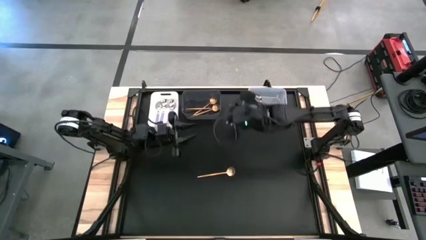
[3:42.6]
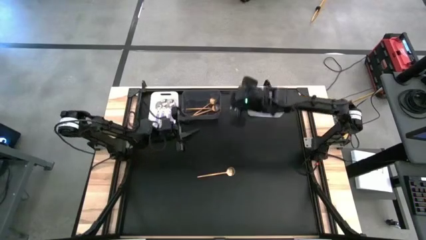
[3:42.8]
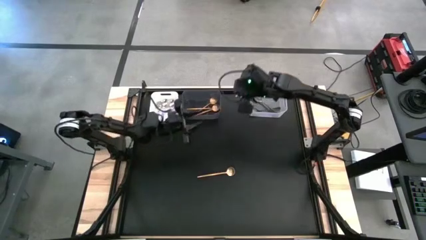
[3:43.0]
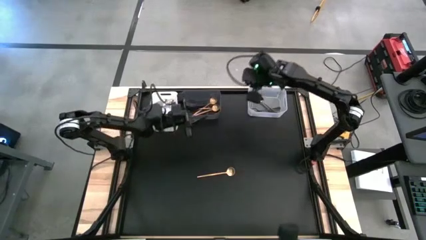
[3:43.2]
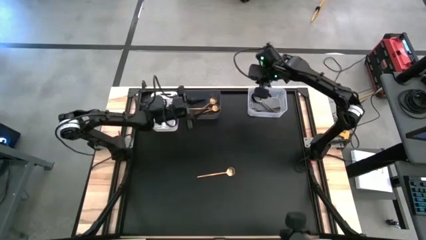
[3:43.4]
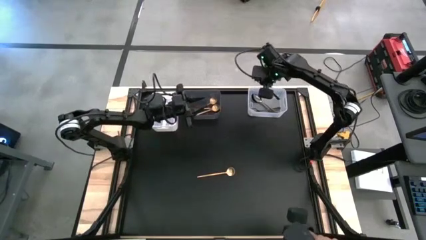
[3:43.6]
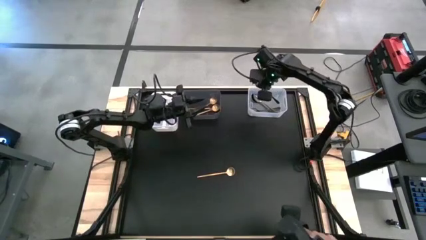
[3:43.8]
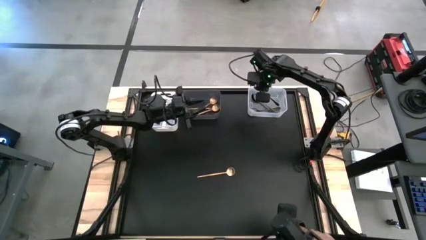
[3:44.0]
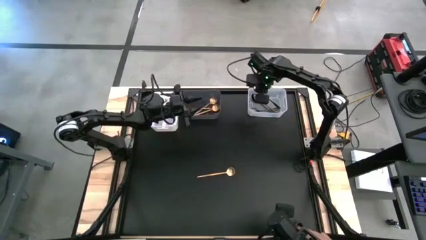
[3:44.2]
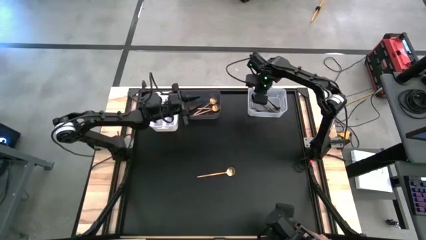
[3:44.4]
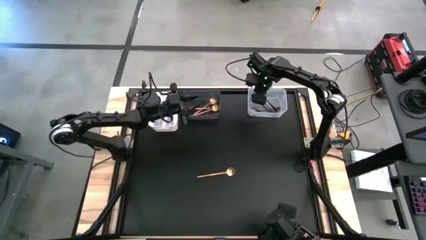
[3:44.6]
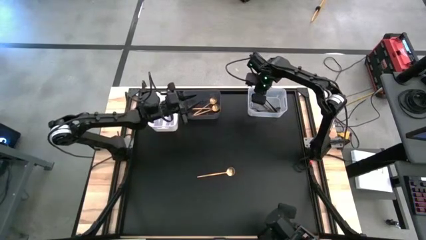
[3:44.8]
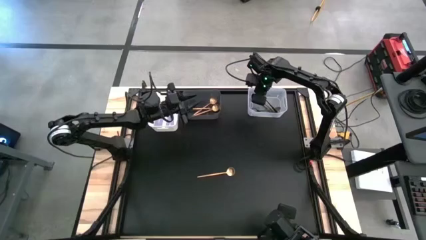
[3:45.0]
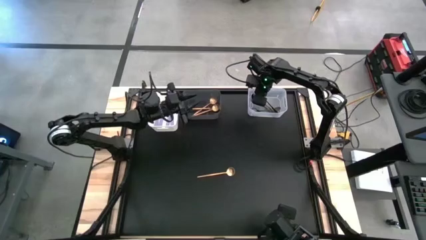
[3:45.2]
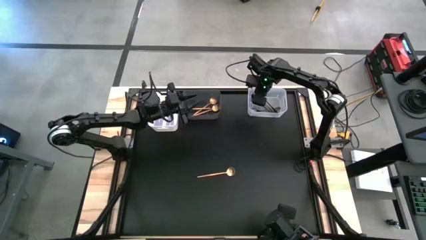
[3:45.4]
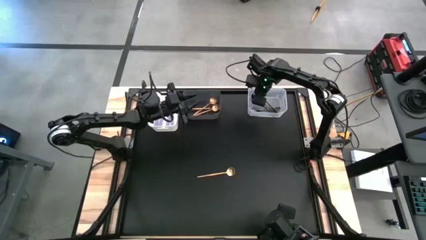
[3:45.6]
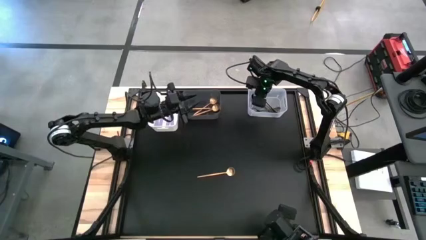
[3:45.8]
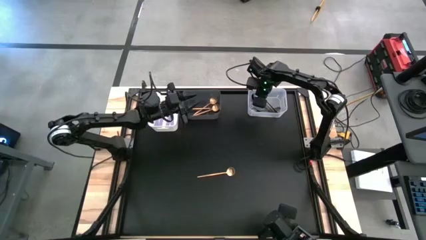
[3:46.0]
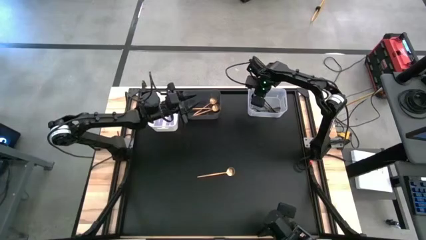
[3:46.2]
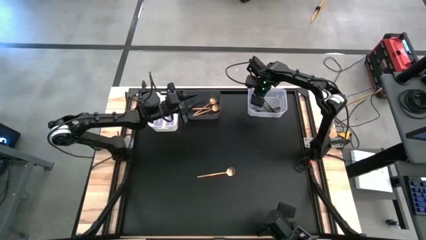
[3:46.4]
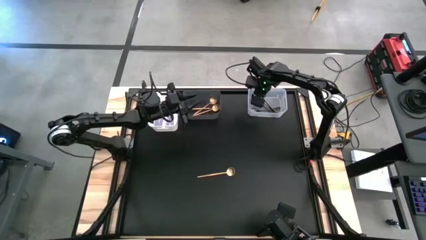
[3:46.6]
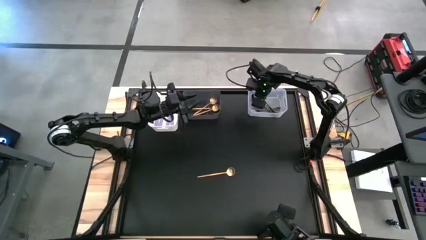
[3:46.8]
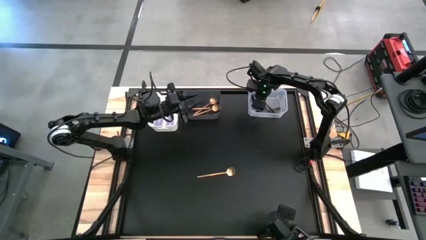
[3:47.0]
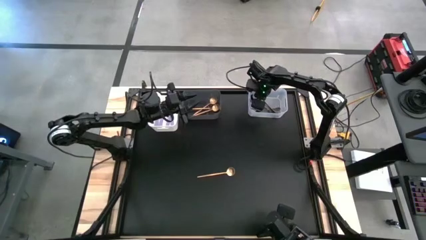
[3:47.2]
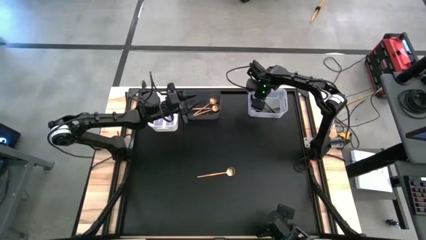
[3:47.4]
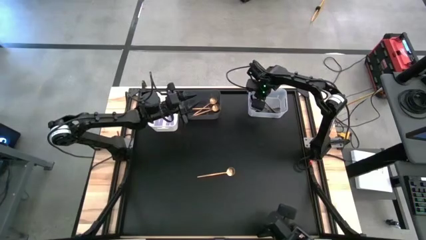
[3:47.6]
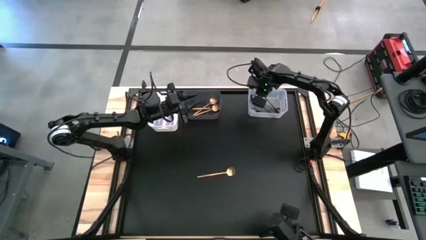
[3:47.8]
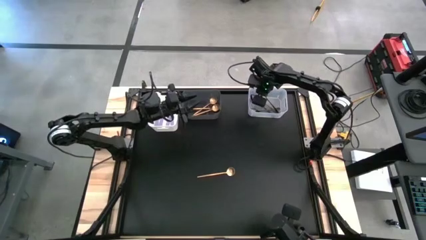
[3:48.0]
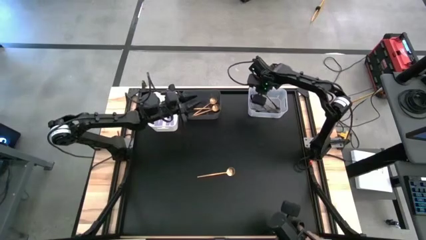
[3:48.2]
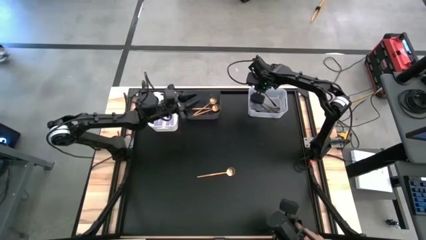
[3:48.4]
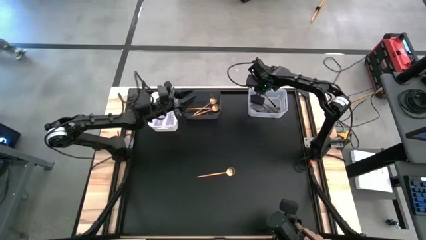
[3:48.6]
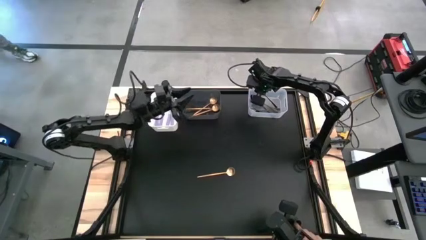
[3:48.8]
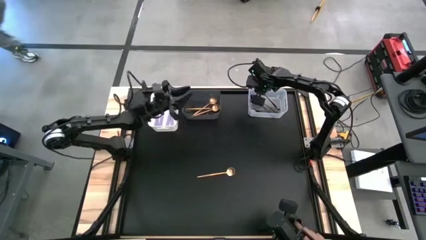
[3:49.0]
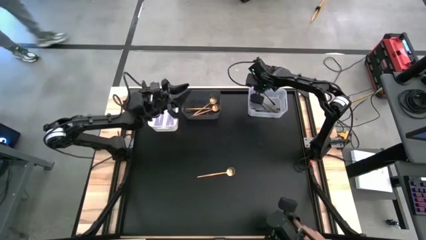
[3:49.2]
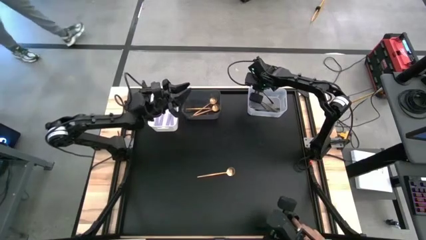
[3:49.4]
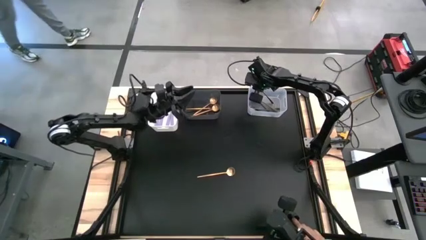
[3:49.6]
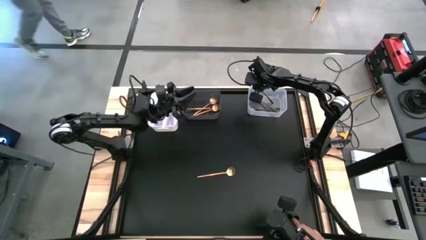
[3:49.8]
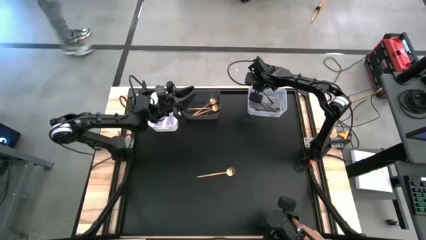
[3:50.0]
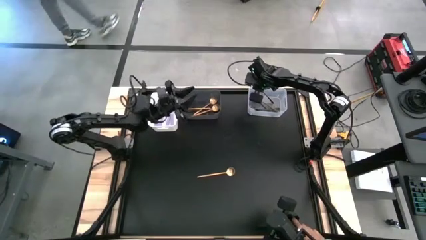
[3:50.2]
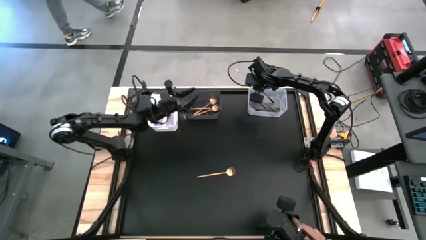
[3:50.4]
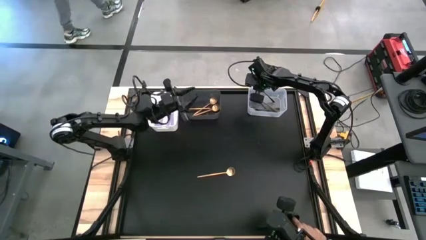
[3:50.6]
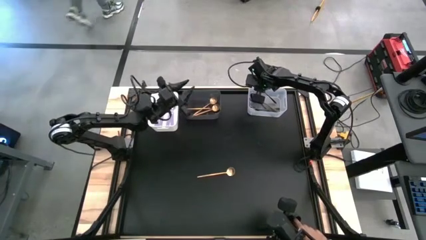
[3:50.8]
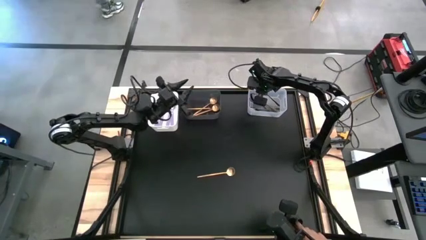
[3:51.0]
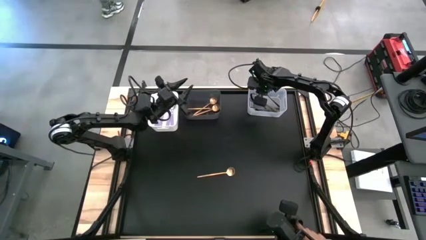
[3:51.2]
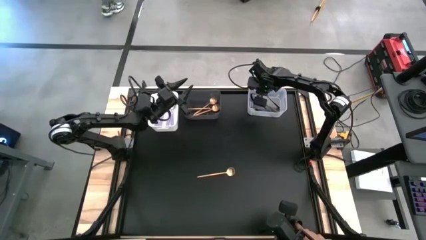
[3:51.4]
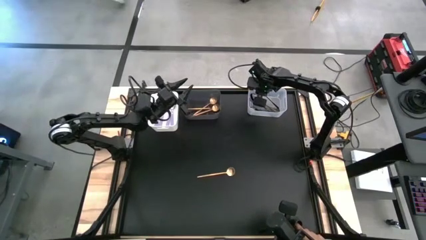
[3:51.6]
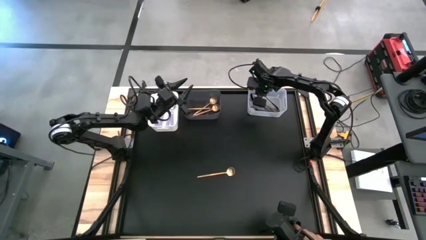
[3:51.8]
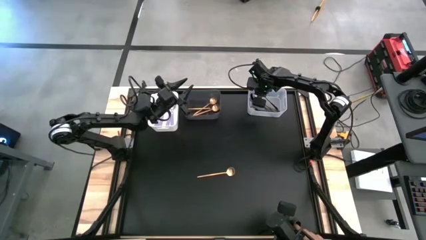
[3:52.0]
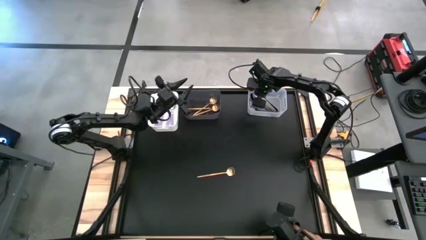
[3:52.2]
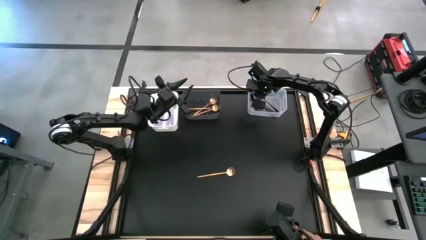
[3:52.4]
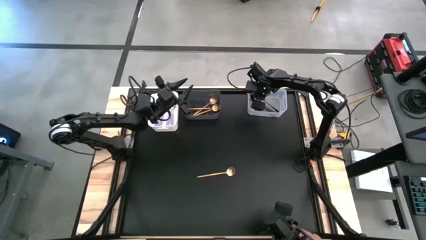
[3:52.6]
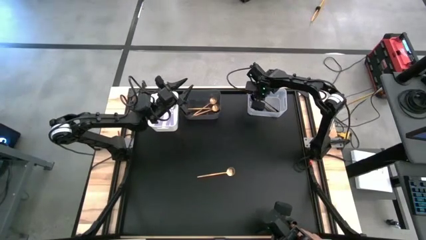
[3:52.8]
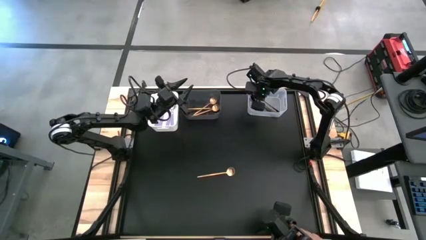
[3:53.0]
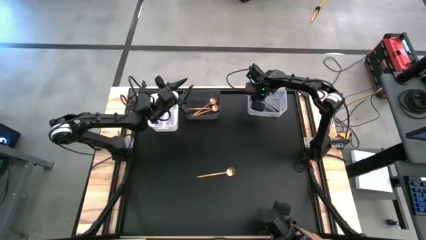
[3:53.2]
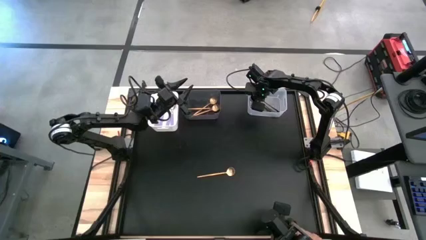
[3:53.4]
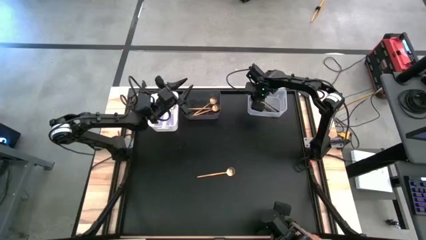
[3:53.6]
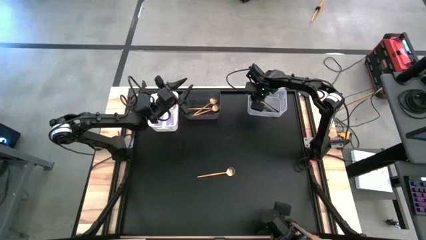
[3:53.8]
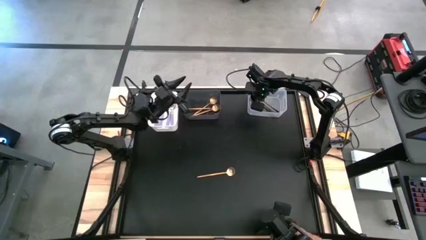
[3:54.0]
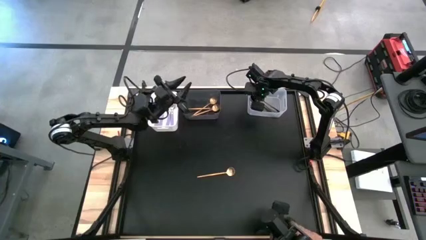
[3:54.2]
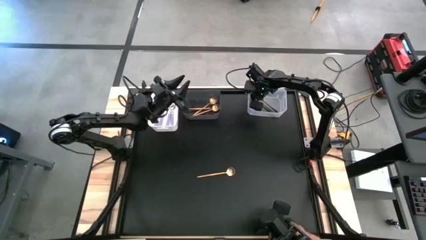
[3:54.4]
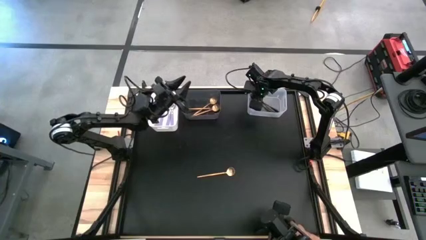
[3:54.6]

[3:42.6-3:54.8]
Task: Sort silverware by color (type)
Put the black spoon into the transparent bin
